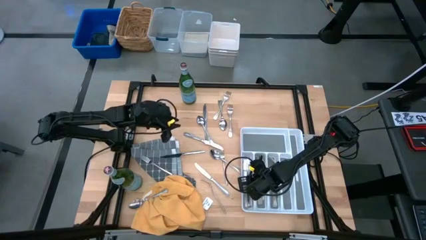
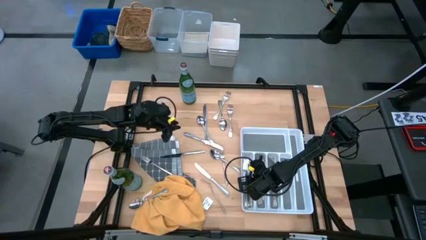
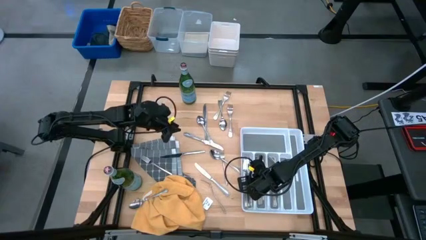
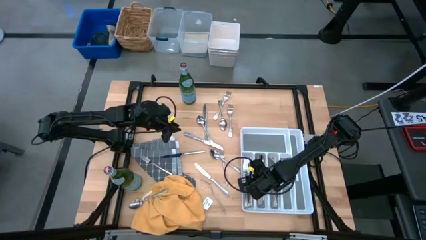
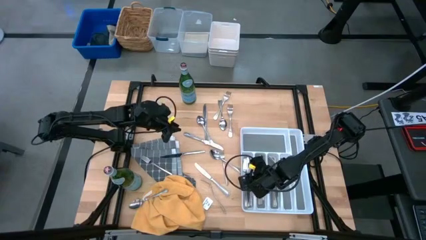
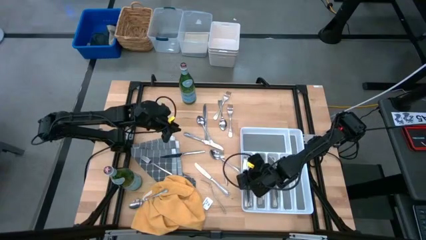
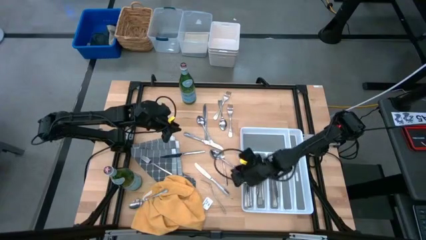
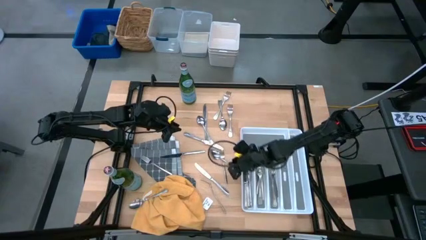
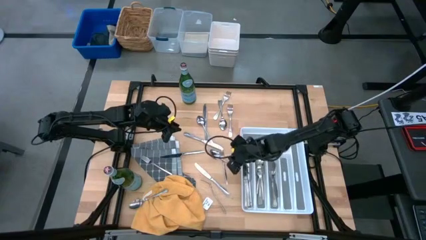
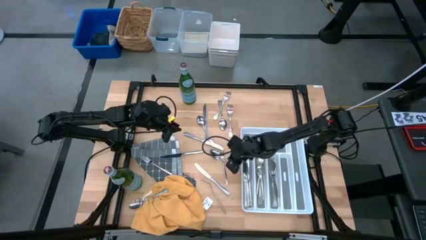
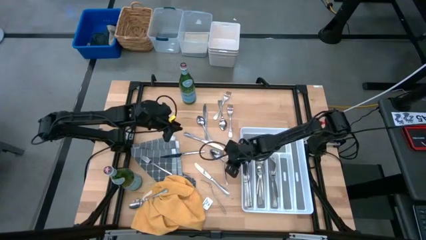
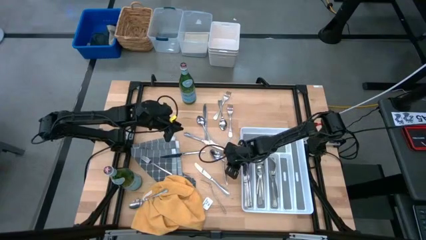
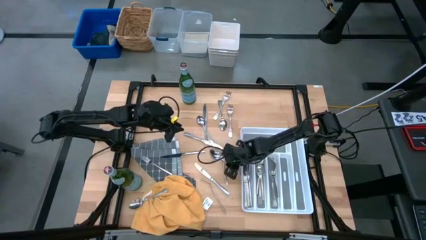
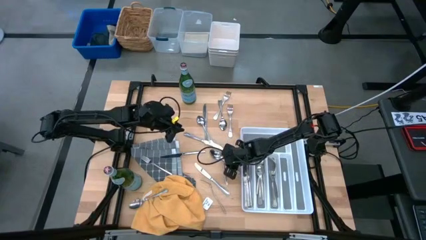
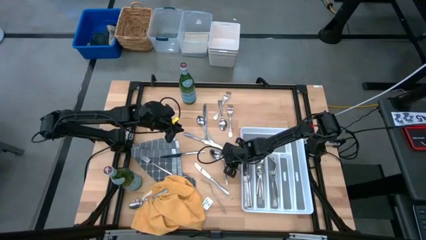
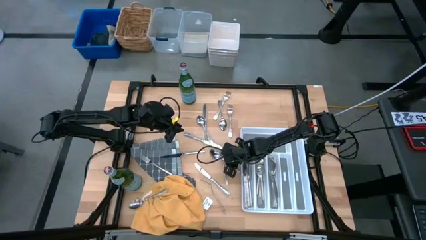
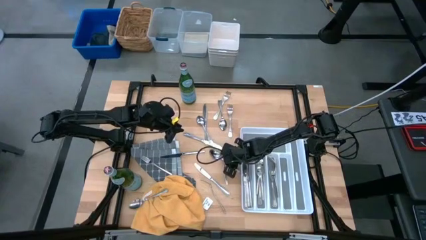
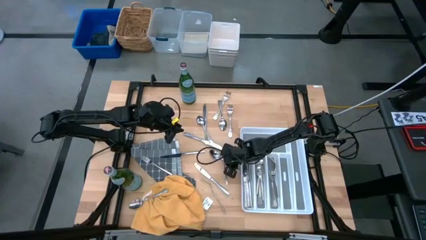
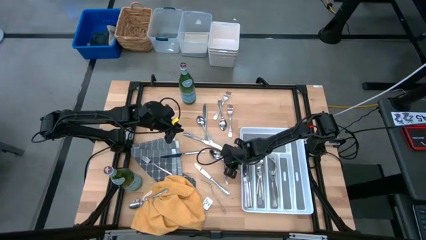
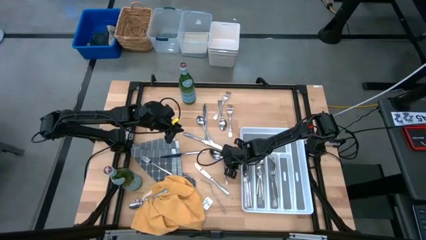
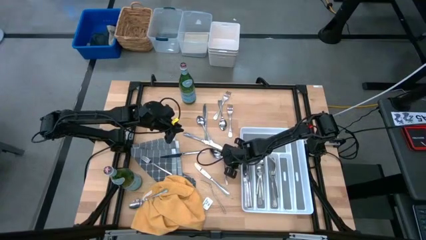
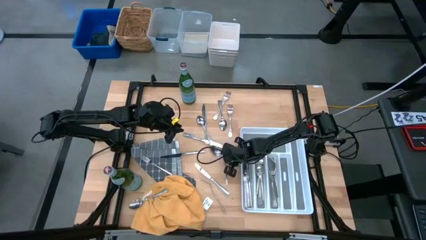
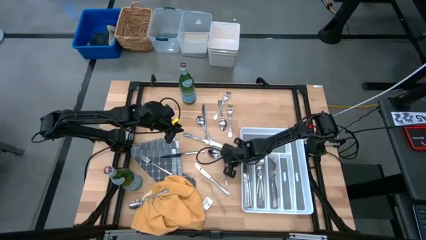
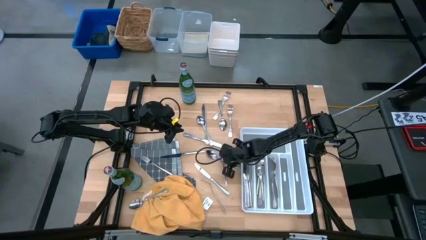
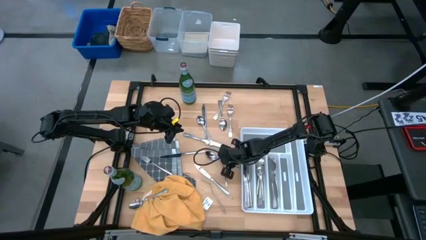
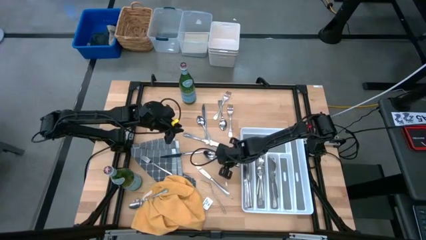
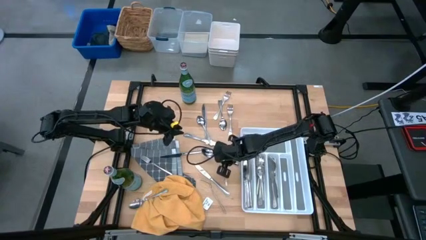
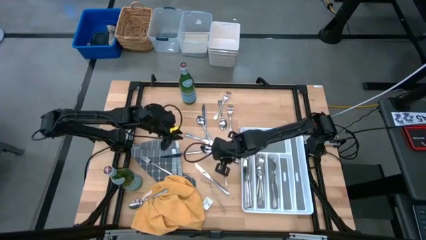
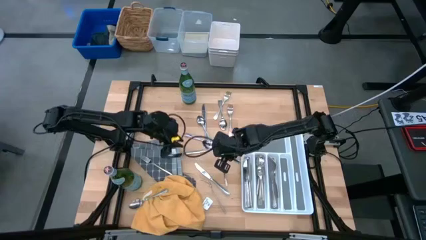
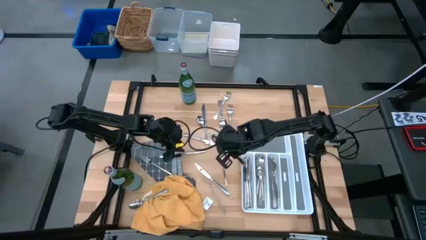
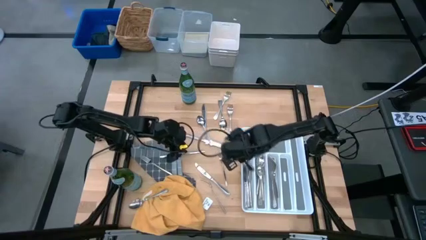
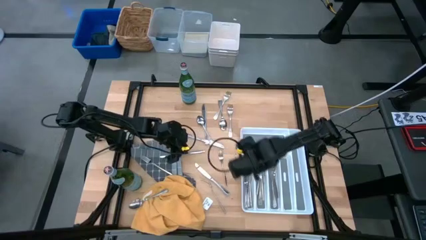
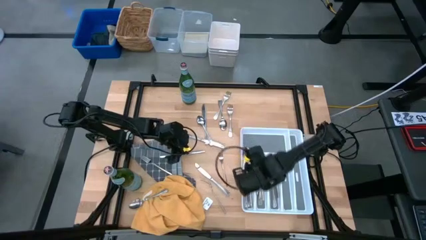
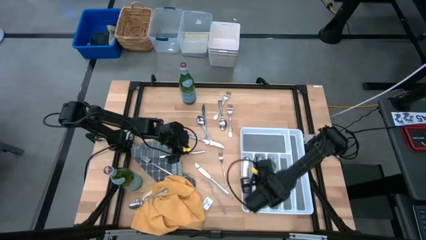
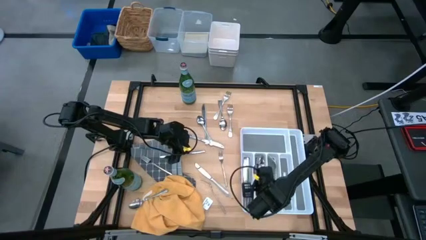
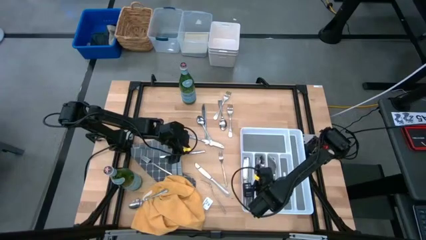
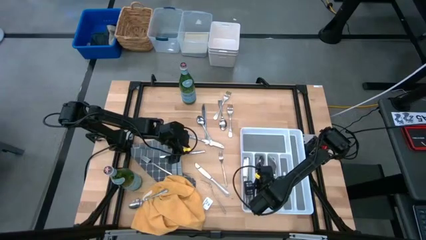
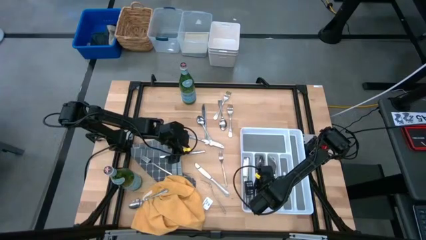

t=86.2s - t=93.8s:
Stack the silver spoon into the white utensil tray with the other silver spoons

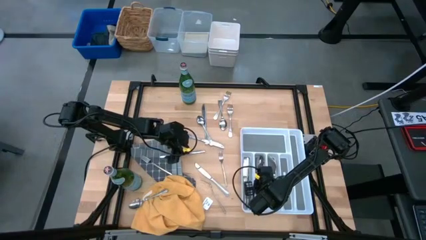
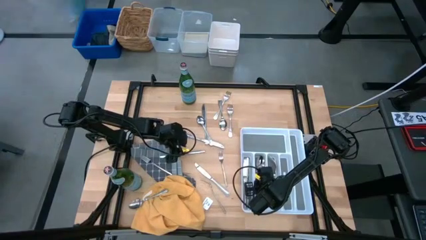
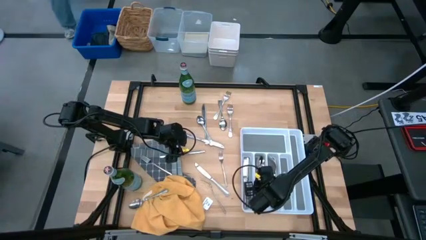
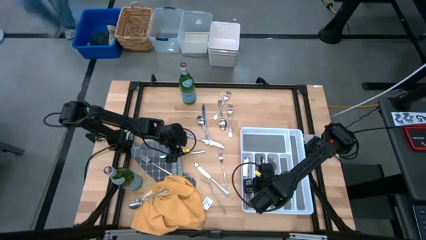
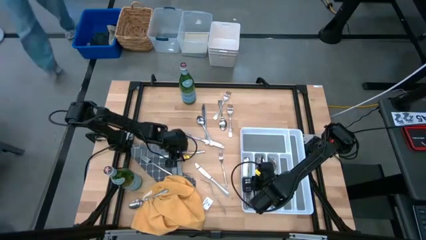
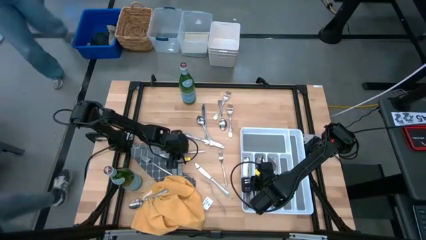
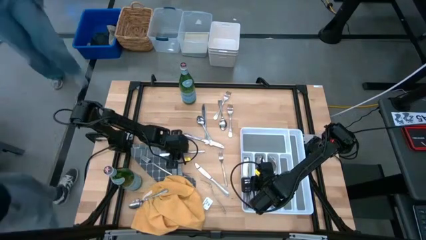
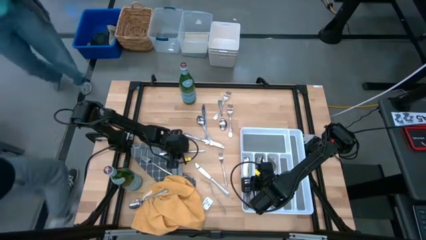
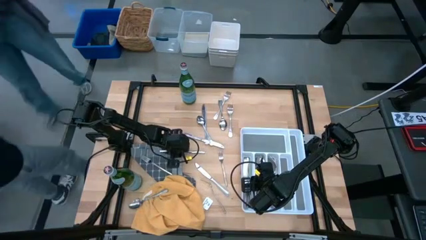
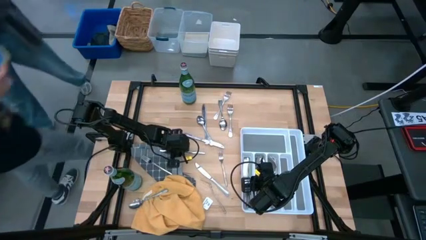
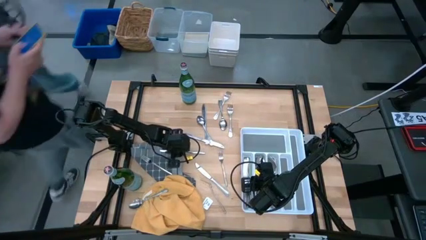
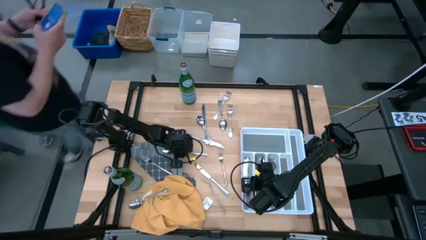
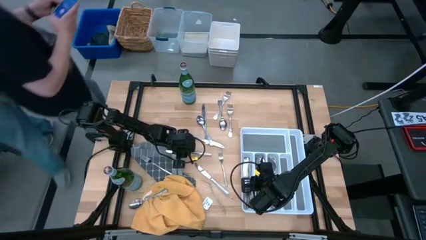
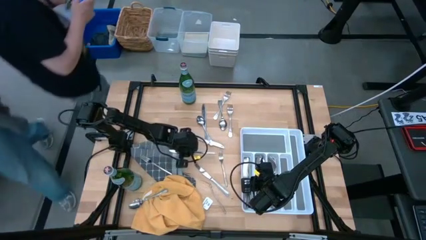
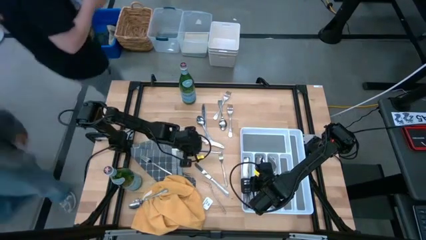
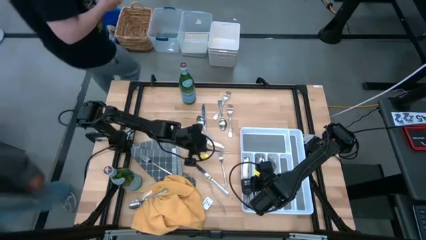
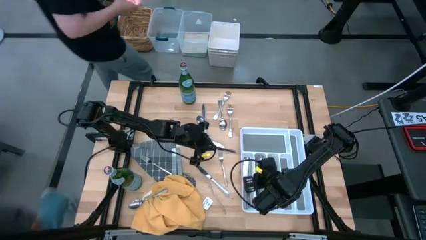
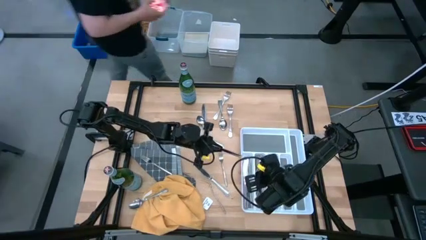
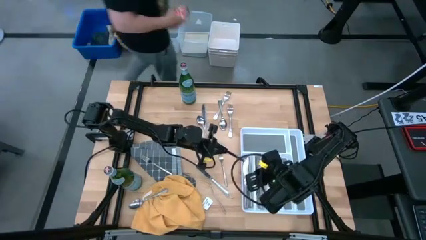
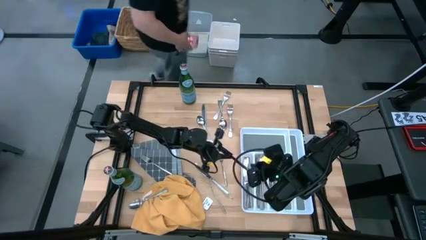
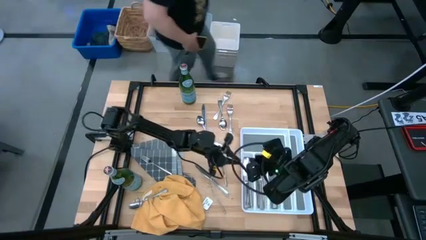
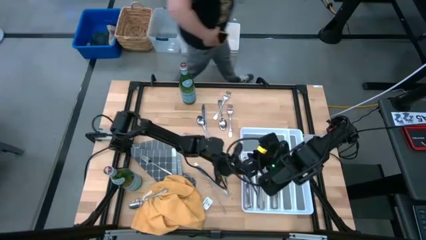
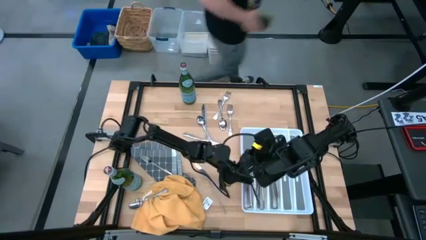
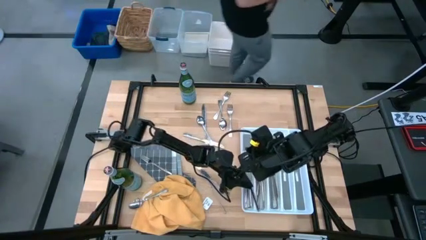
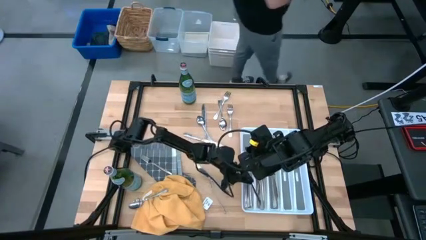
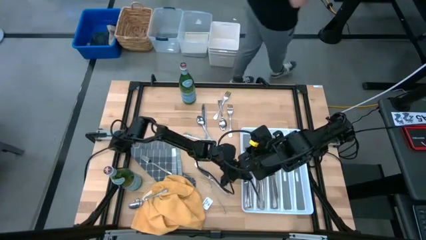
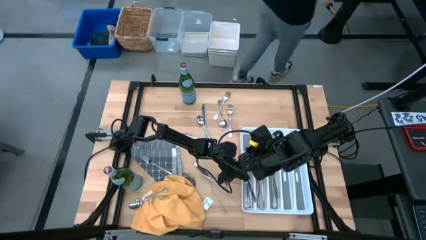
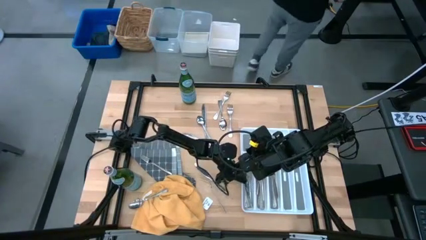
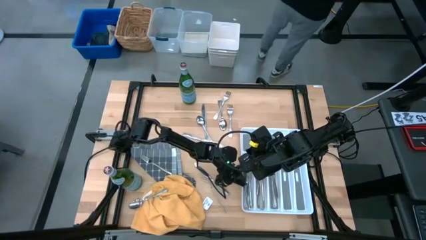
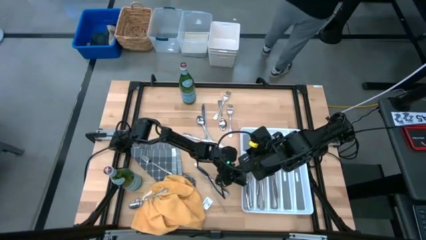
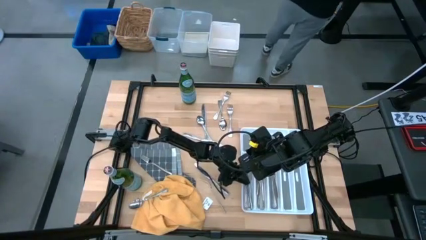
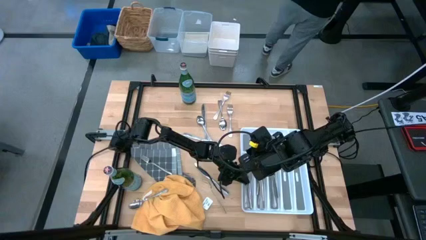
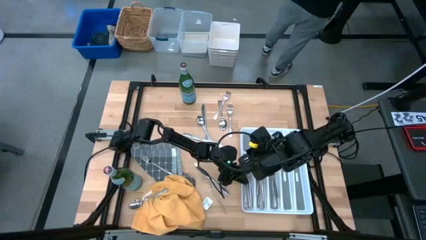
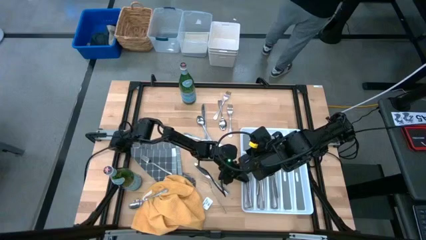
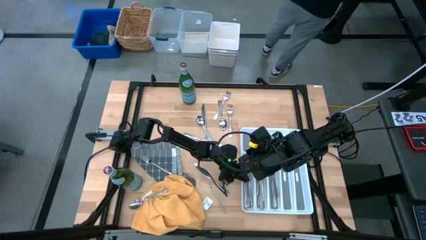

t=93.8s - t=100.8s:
Stack the silver knife into the white utensil tray with the other silver knives
